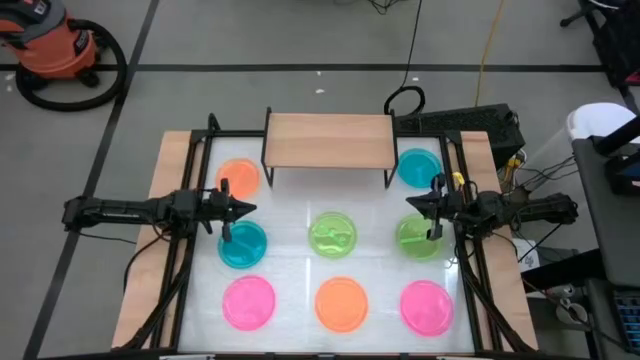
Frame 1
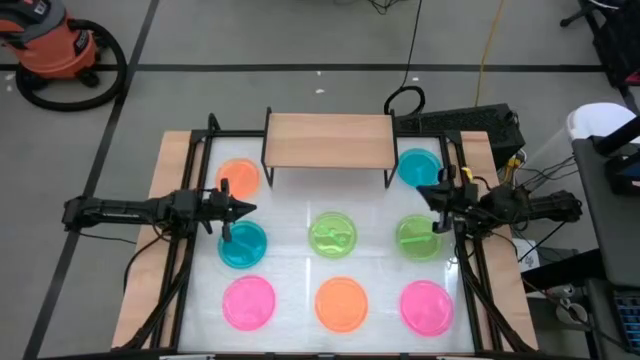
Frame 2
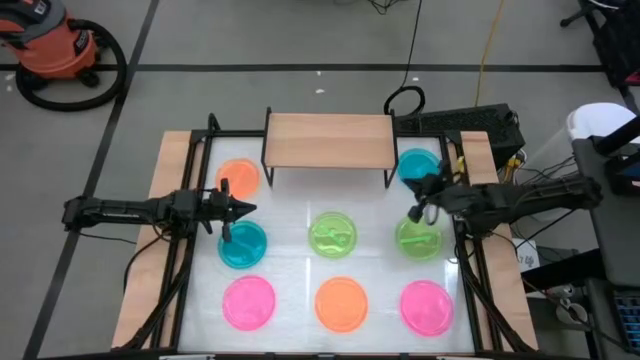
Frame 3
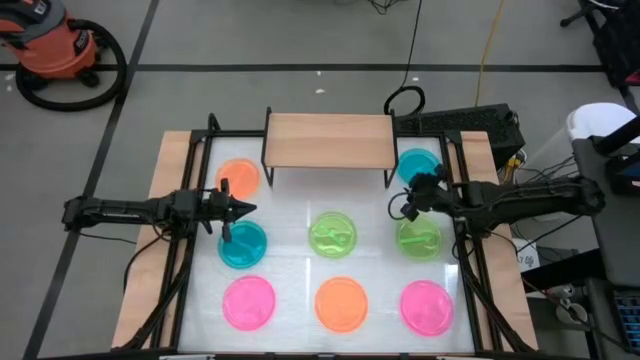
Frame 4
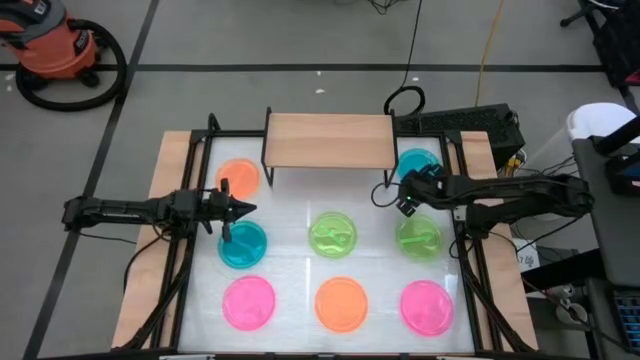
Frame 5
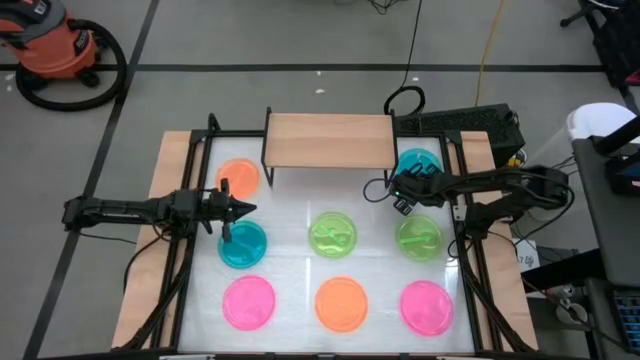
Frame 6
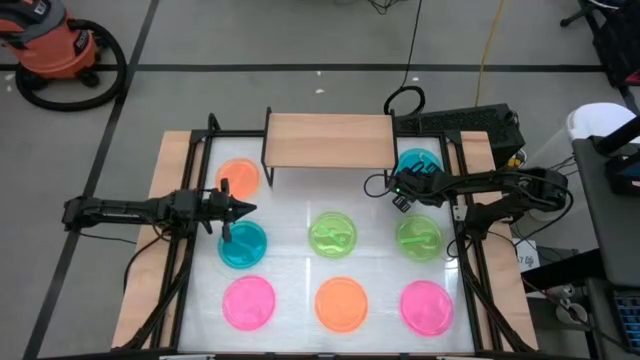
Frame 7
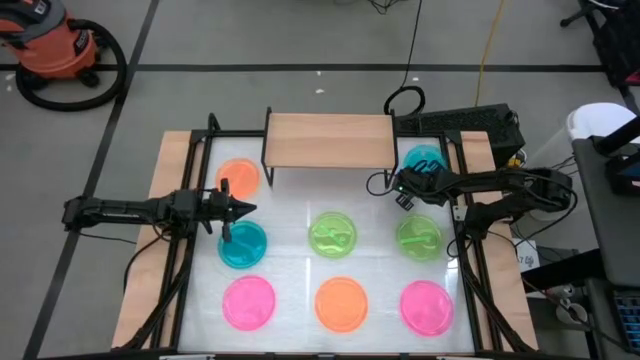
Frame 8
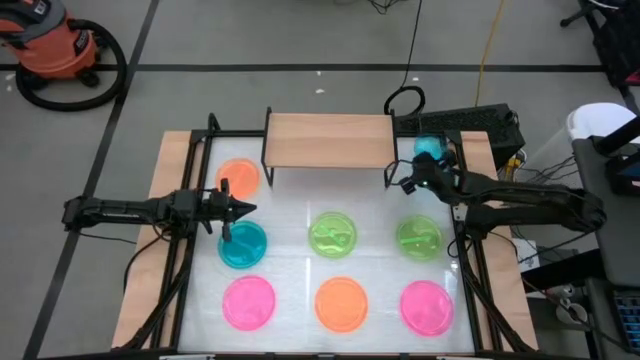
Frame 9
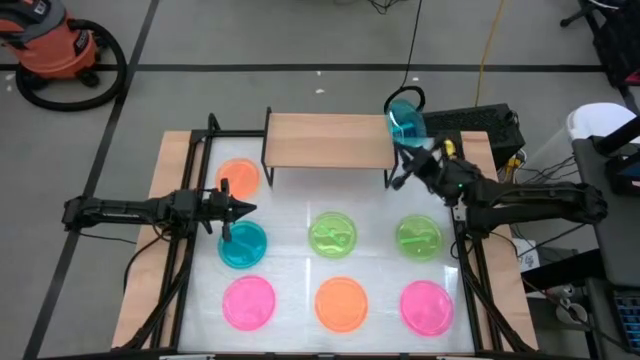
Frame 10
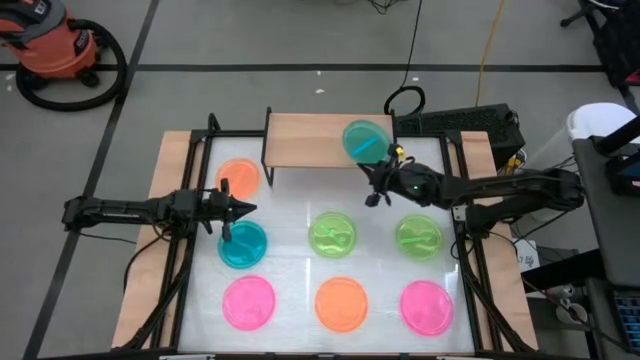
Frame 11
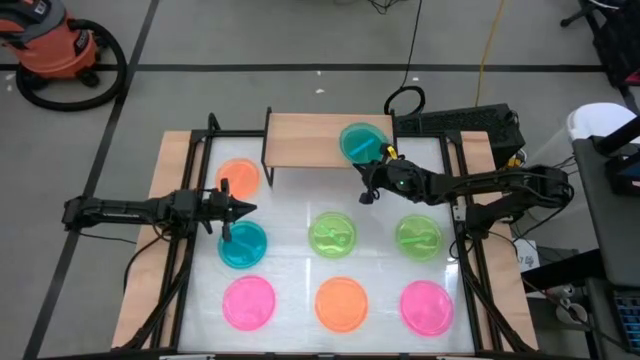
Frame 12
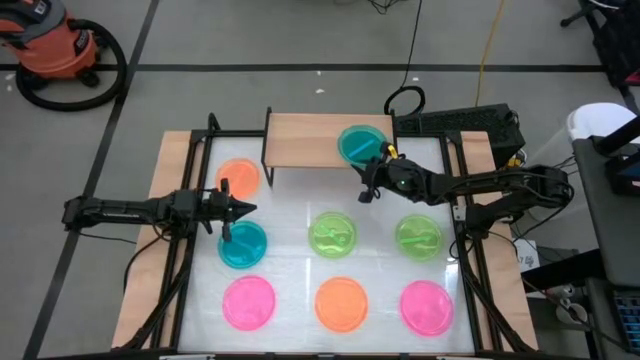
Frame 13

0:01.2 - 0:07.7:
Task: Place and stack plates onto a shelf
Put the top blue plate on the shelf

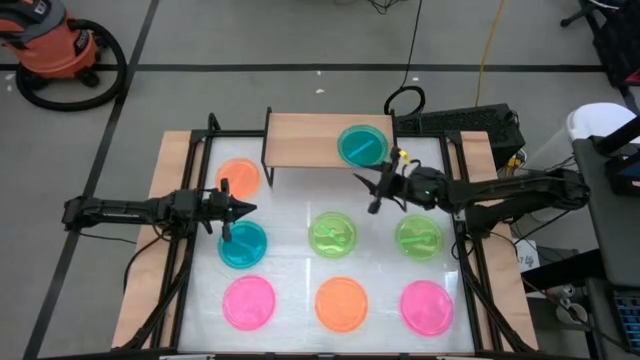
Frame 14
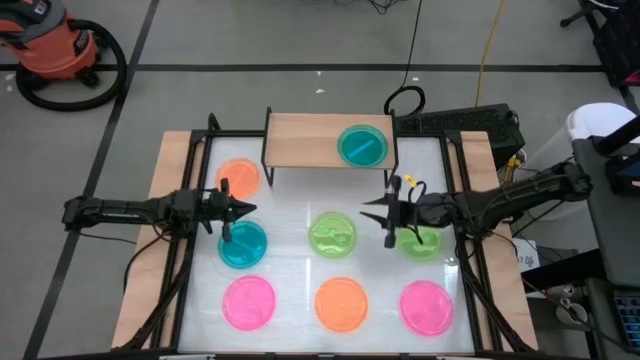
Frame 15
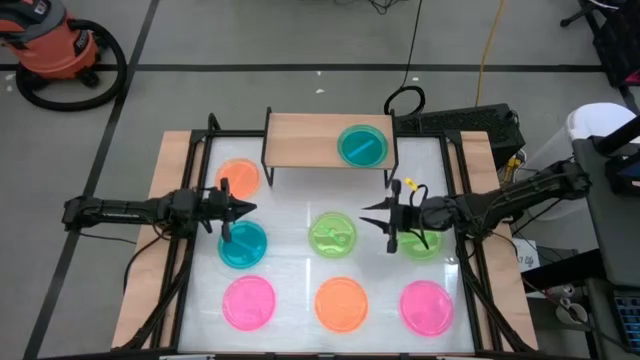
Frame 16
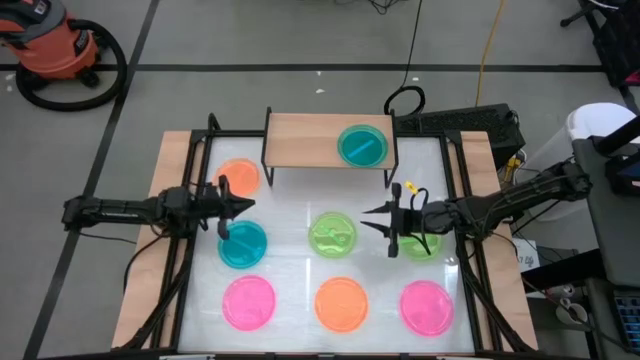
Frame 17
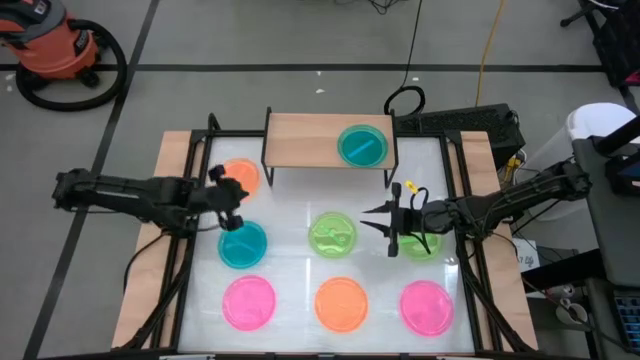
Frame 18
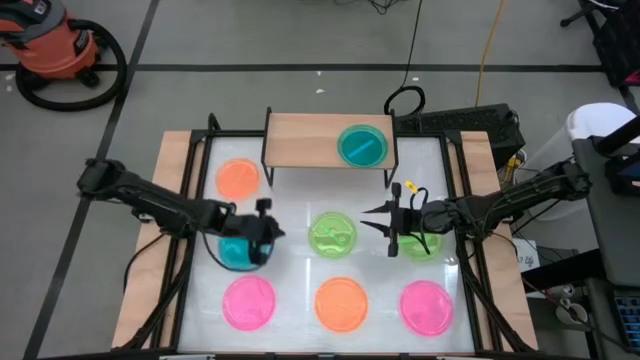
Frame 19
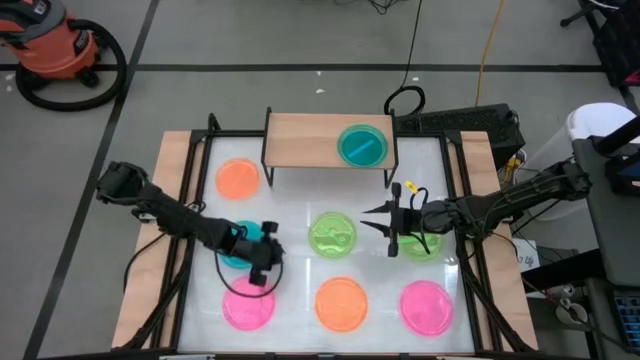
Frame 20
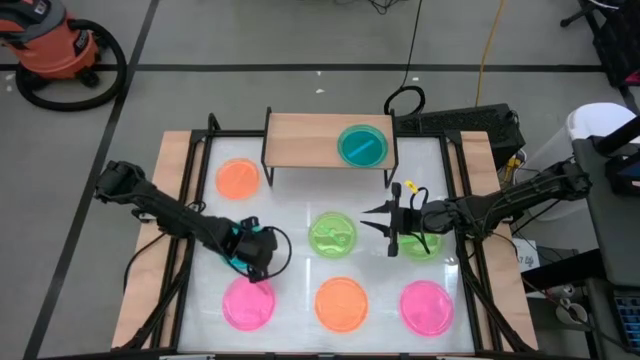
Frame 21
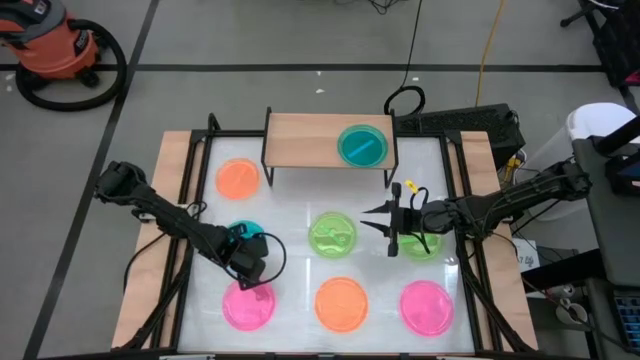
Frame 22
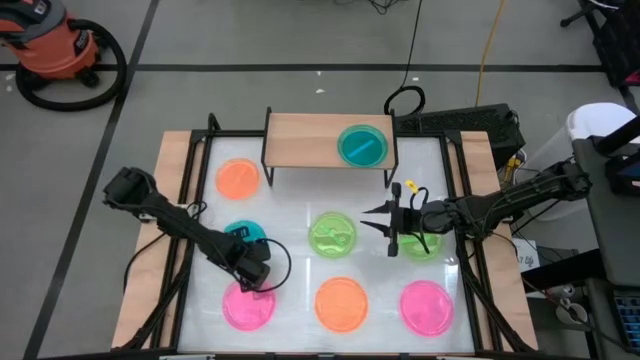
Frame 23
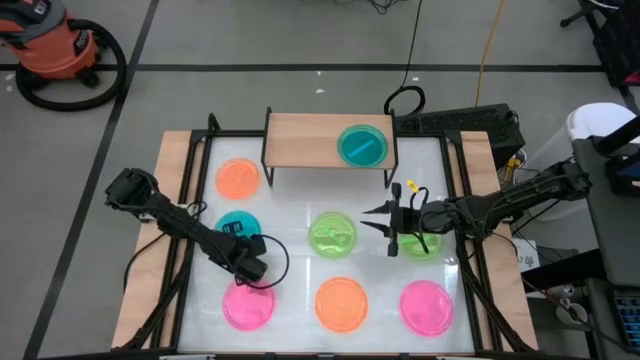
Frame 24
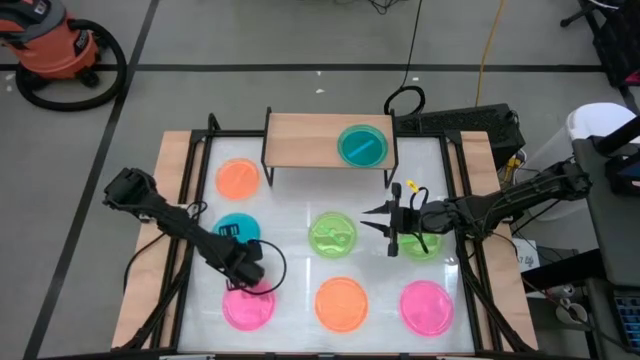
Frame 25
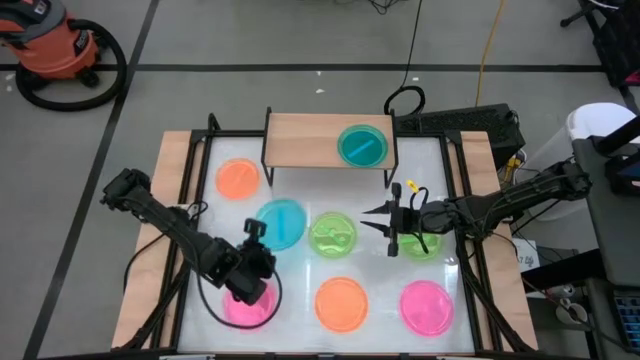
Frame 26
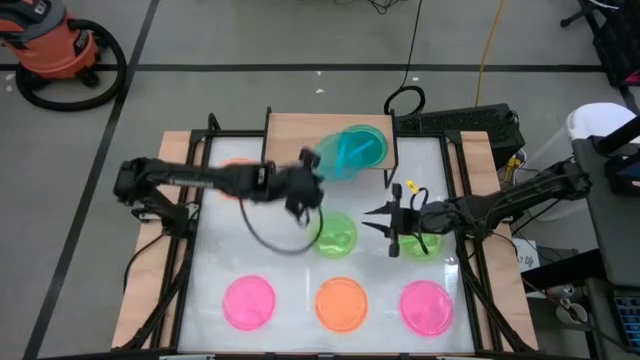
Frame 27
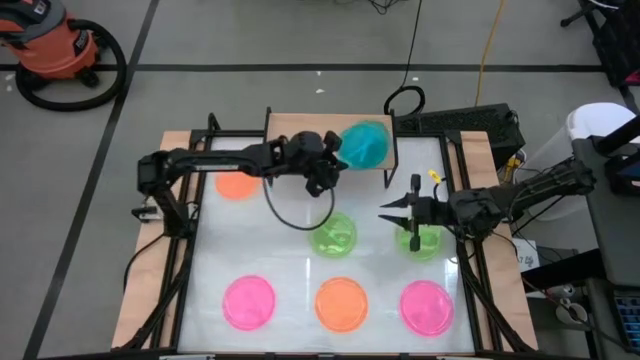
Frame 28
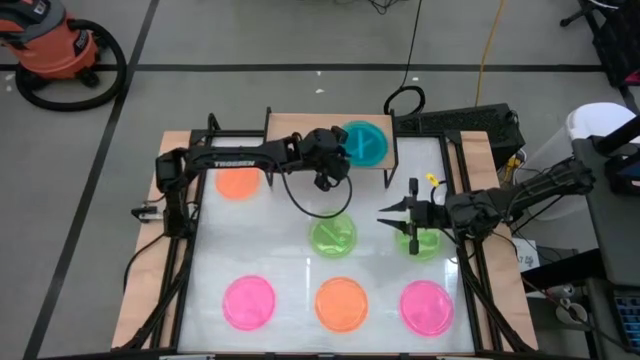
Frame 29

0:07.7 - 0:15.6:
Stack the blue plate on top of the blue plate on the shelf

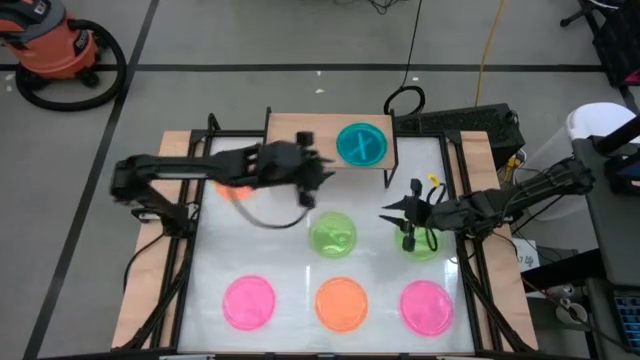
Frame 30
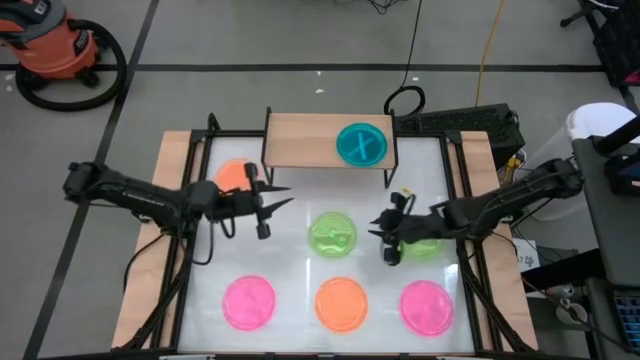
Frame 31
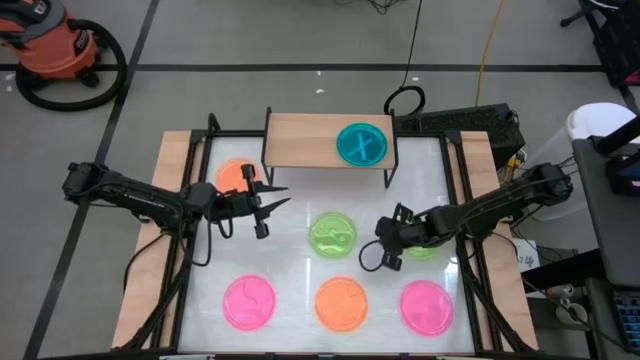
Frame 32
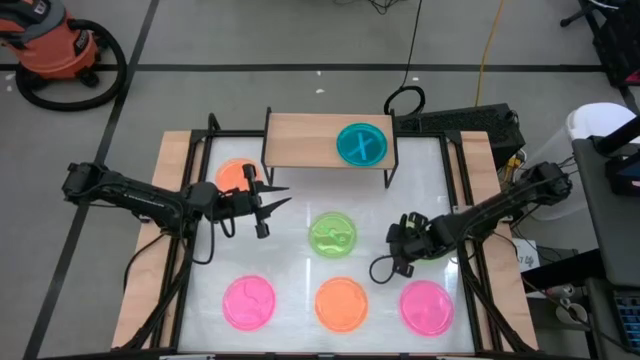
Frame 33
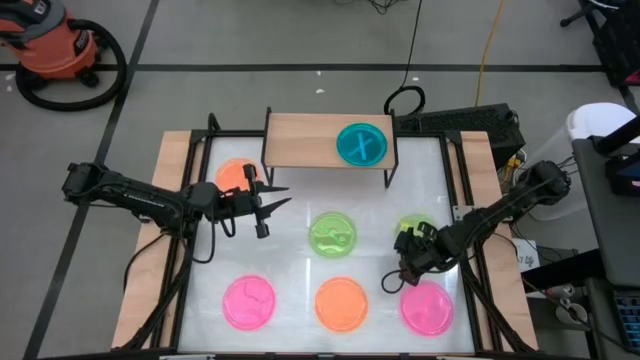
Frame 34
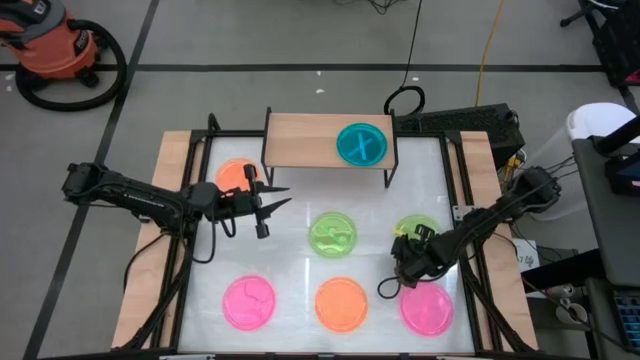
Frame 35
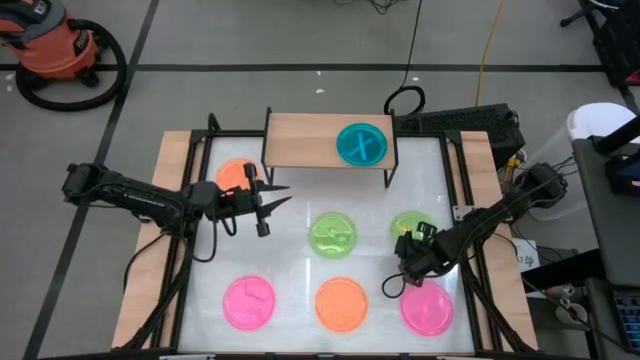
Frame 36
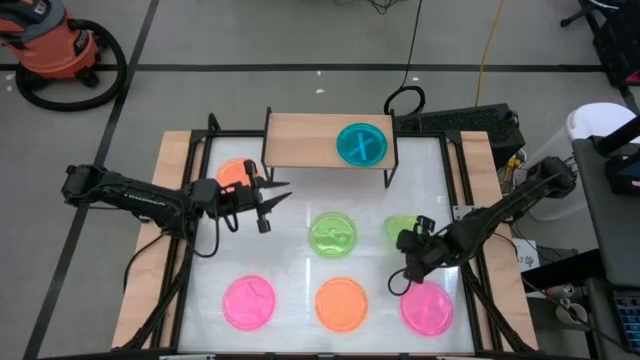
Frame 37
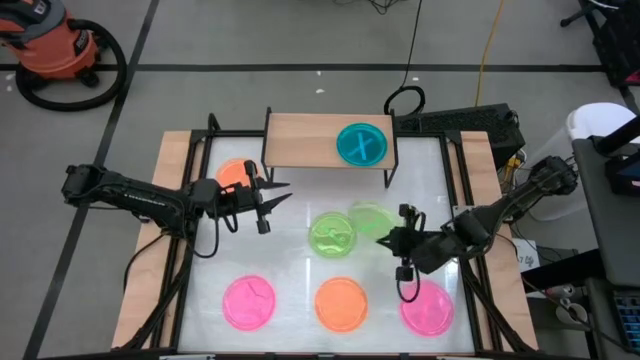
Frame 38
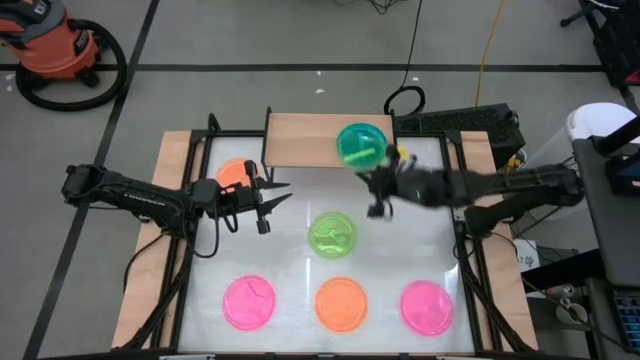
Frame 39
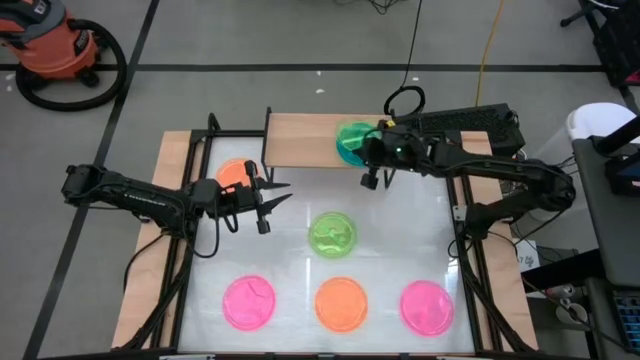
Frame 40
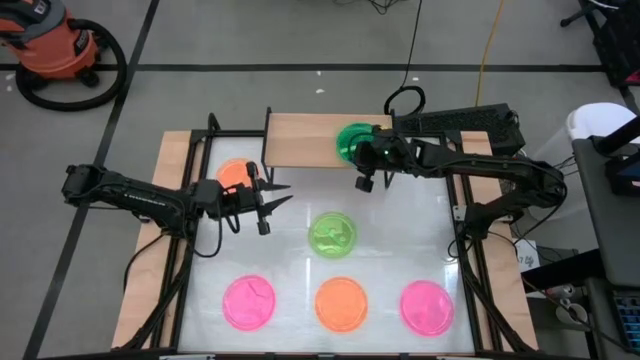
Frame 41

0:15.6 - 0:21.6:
Stack the right green plate on top of the blue plate on the shelf

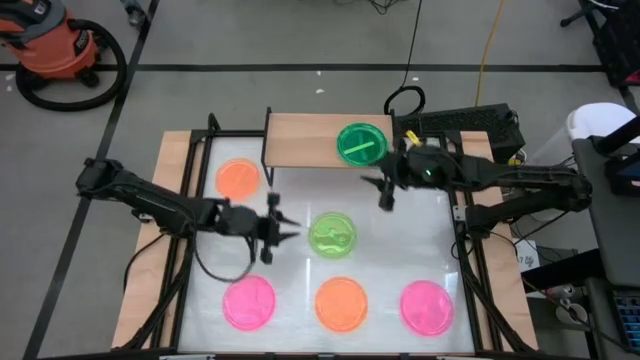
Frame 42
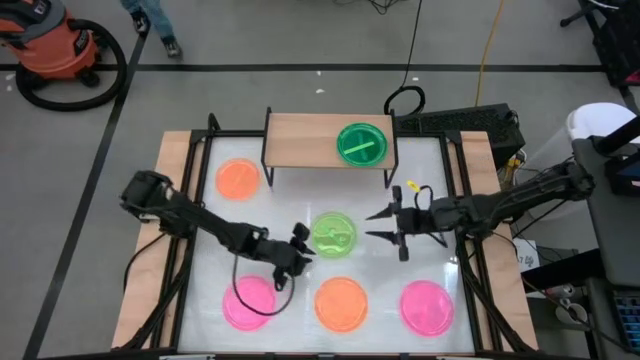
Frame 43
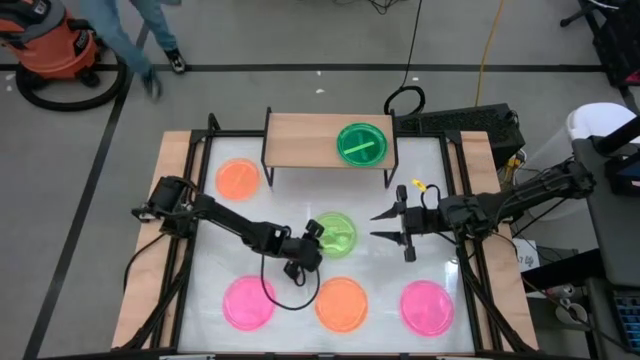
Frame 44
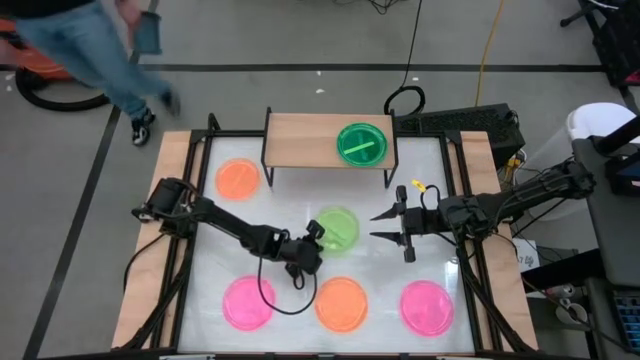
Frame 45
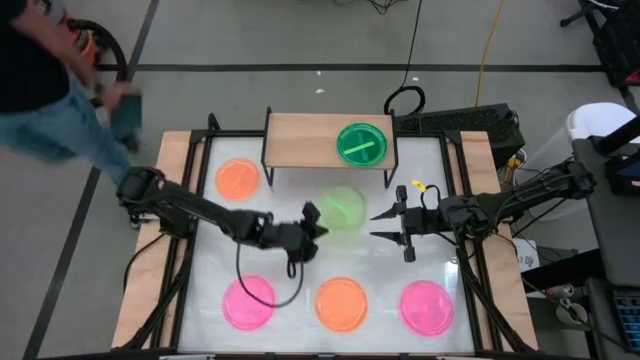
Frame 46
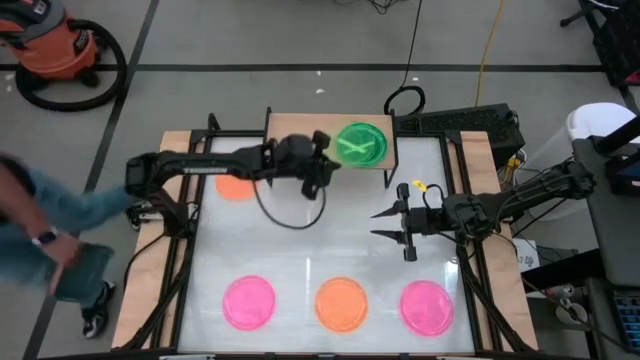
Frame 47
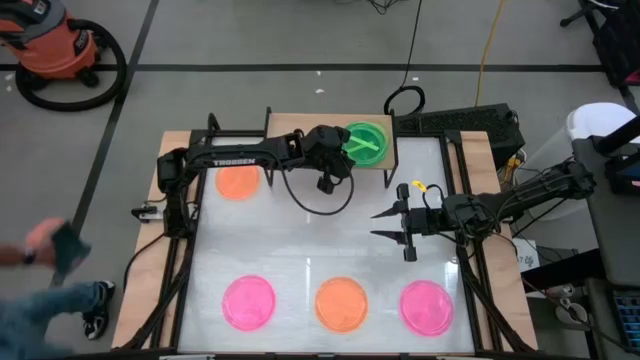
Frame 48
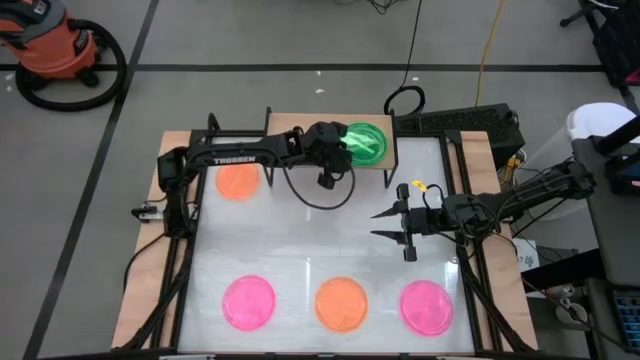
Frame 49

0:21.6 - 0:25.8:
Stack the green plate on top of the green plate on the shelf
